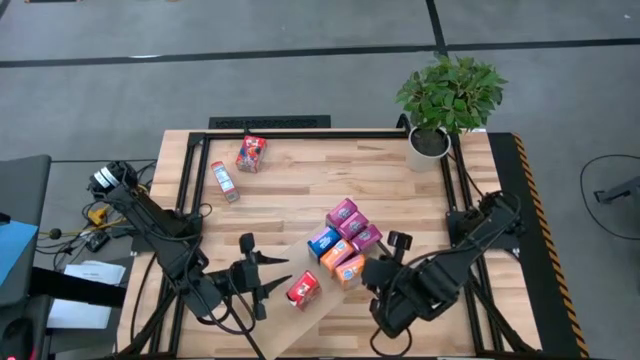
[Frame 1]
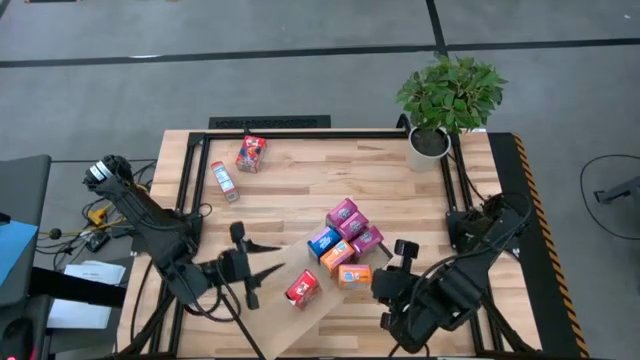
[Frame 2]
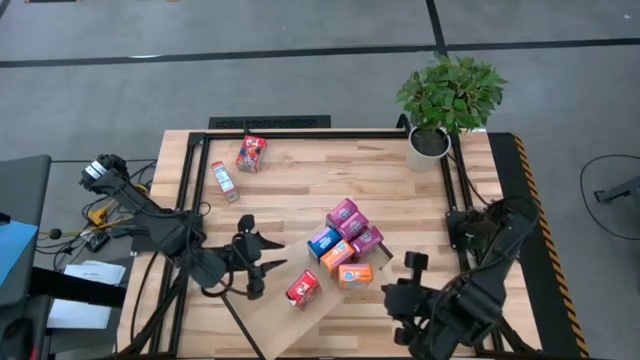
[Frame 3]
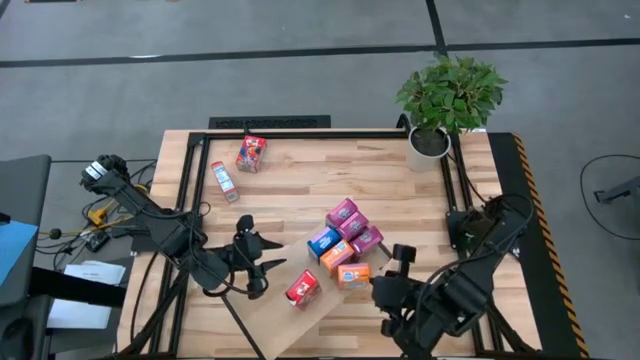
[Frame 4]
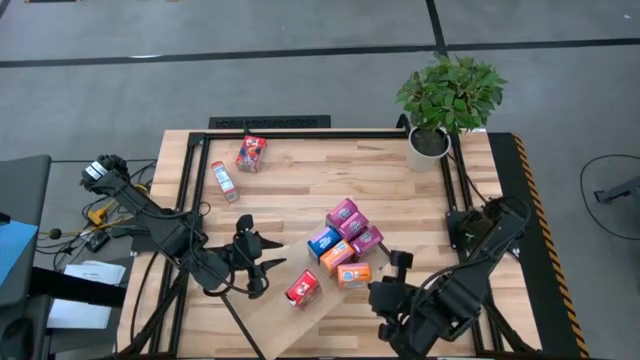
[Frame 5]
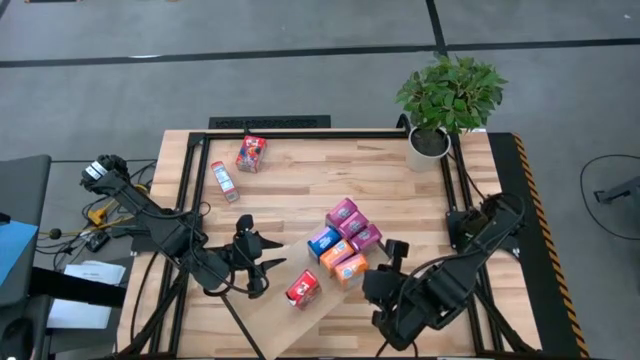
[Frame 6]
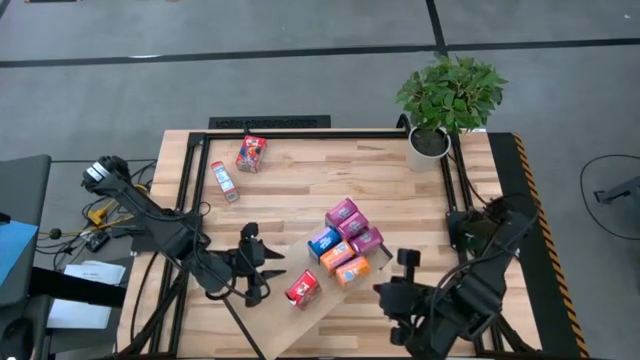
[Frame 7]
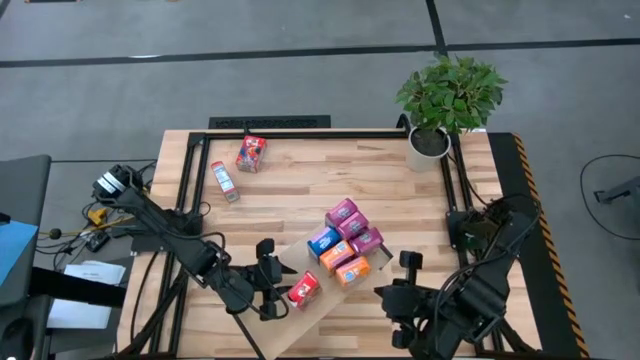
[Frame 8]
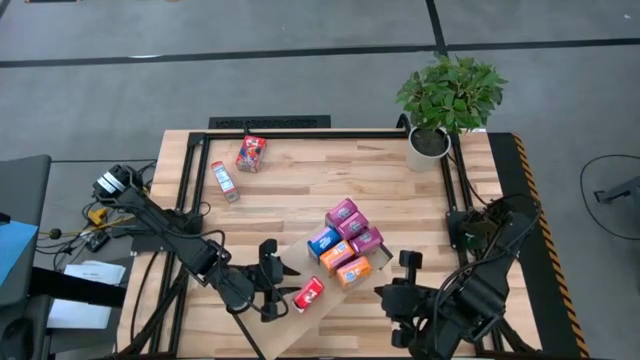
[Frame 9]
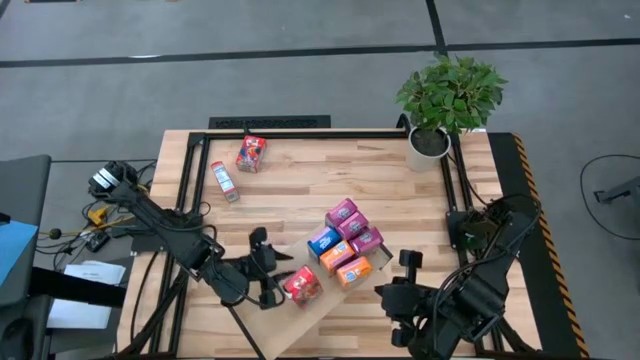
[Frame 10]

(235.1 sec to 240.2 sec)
Task: Stack cereal on shelf
Adjust the cereal box on the shelf

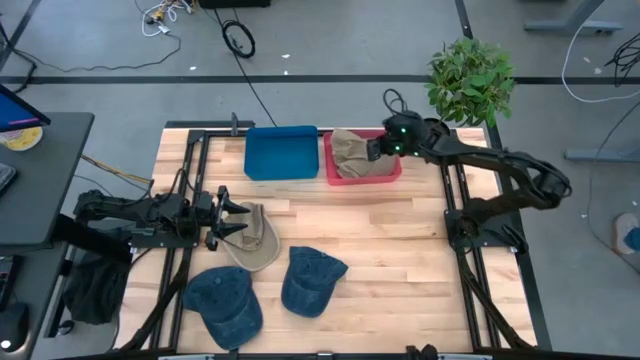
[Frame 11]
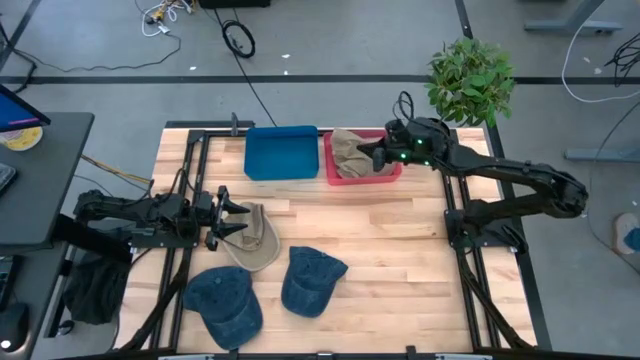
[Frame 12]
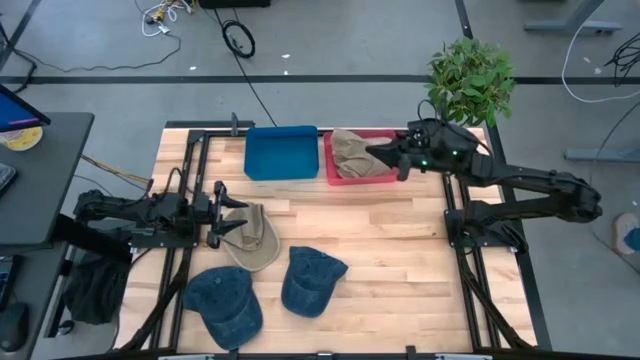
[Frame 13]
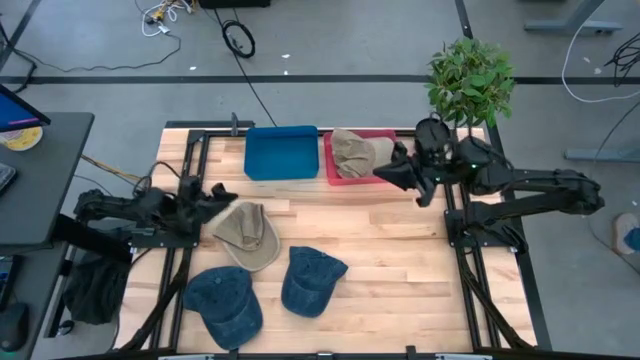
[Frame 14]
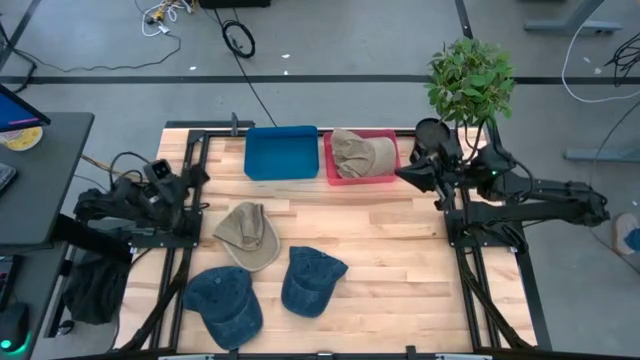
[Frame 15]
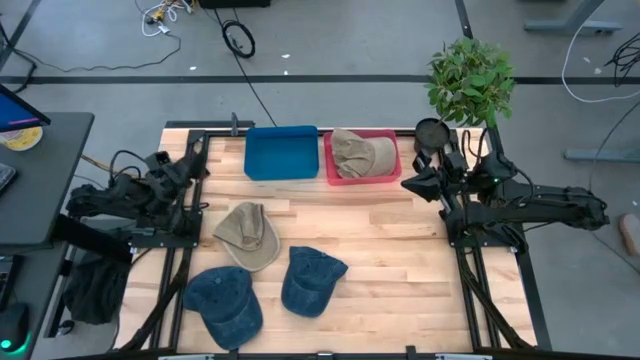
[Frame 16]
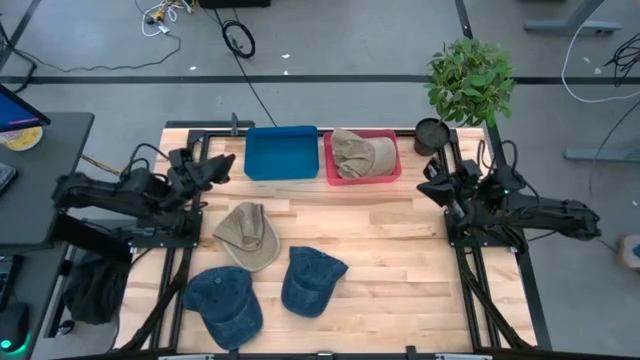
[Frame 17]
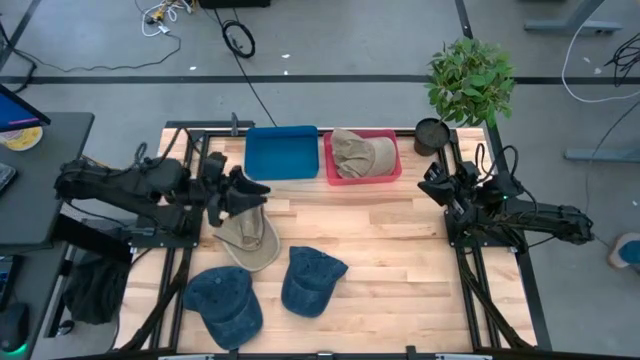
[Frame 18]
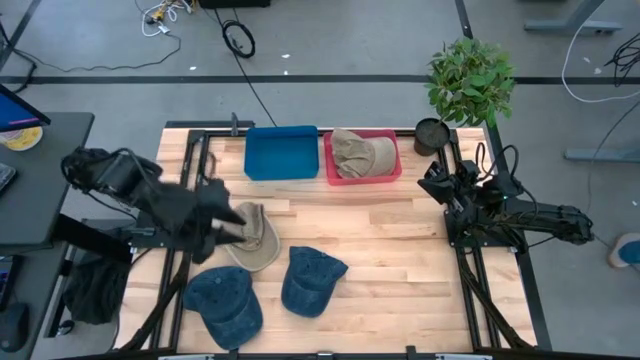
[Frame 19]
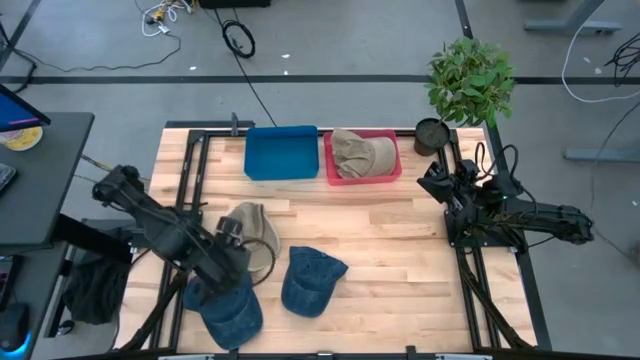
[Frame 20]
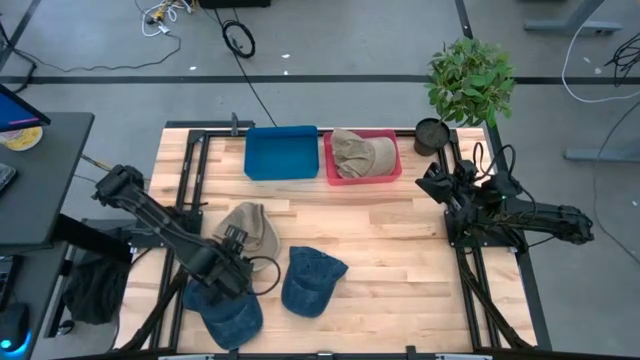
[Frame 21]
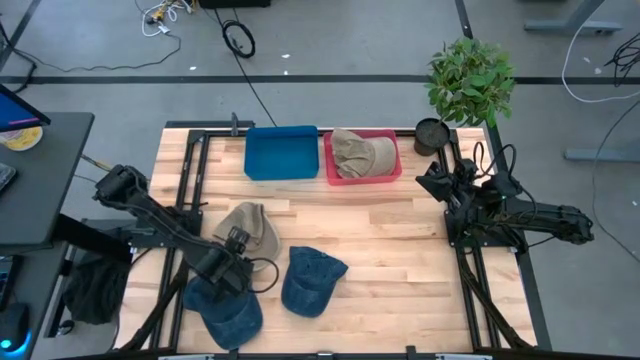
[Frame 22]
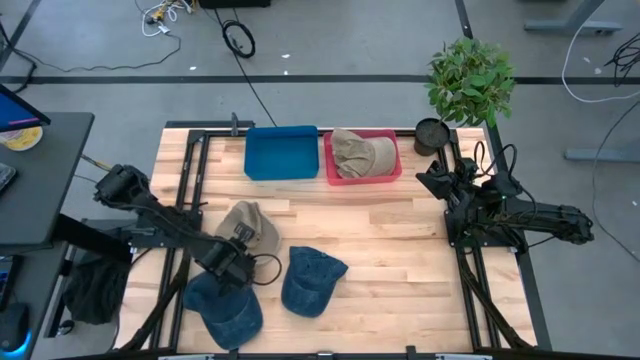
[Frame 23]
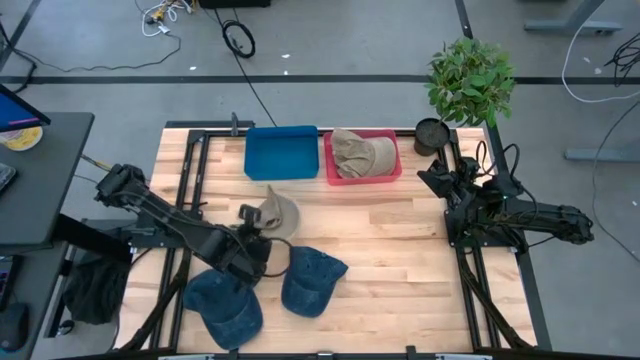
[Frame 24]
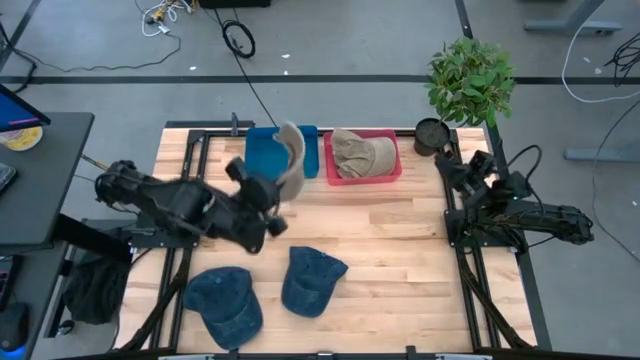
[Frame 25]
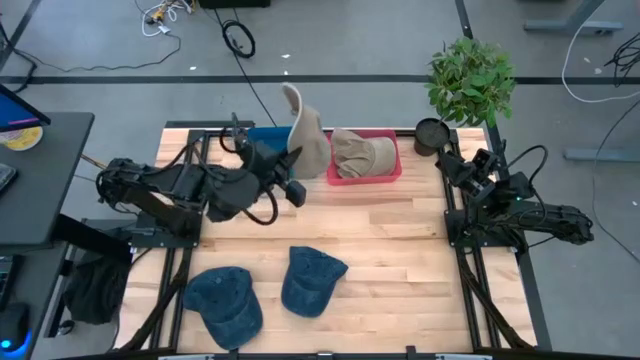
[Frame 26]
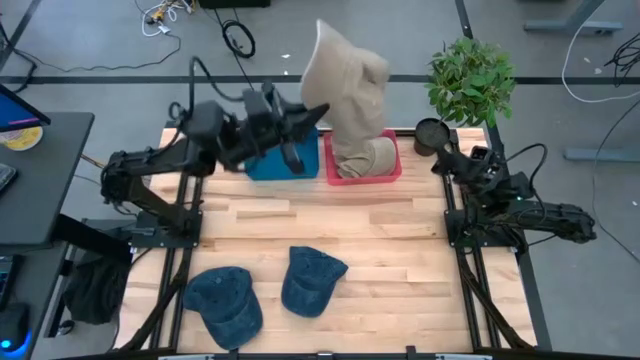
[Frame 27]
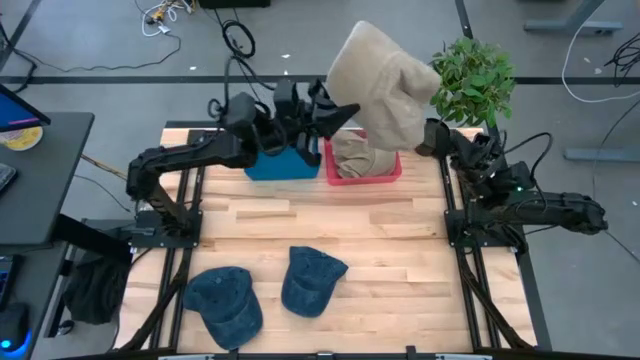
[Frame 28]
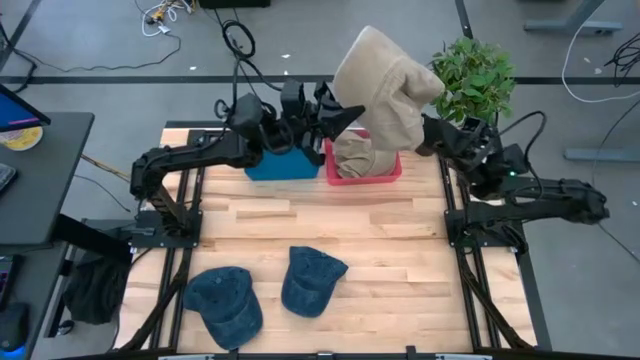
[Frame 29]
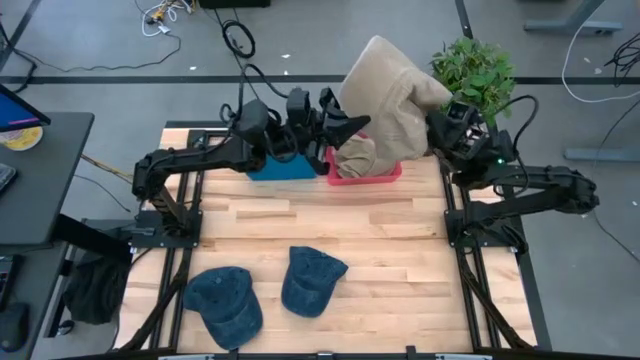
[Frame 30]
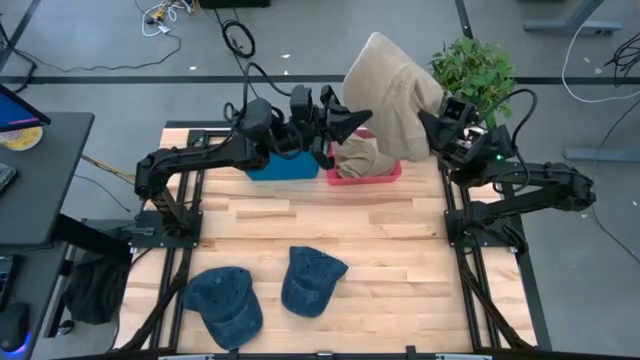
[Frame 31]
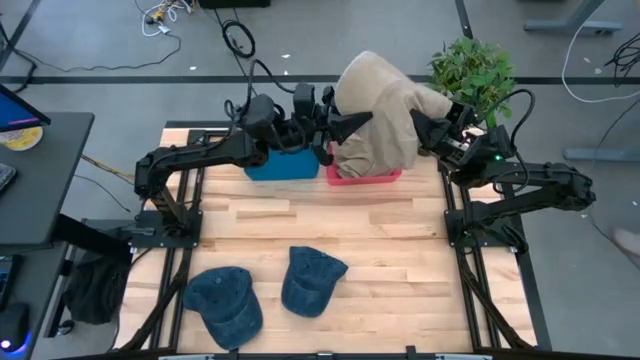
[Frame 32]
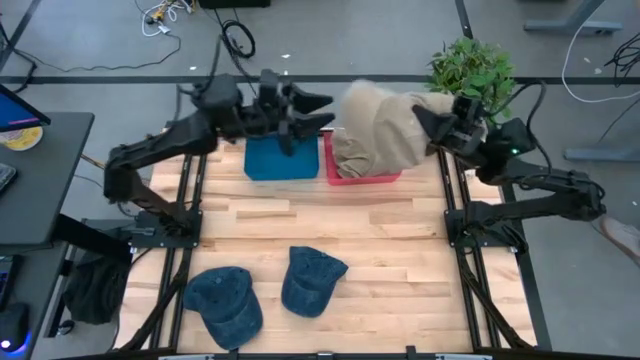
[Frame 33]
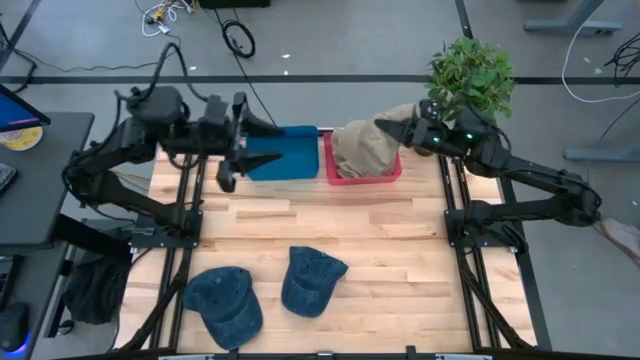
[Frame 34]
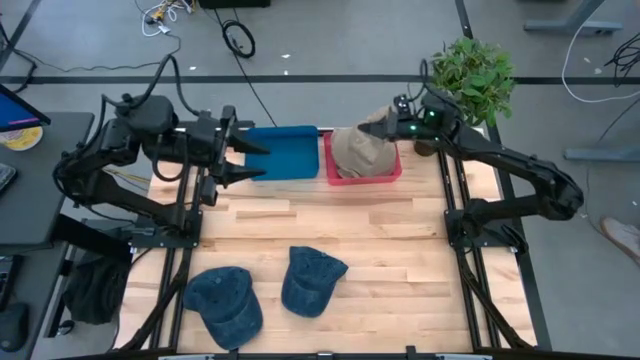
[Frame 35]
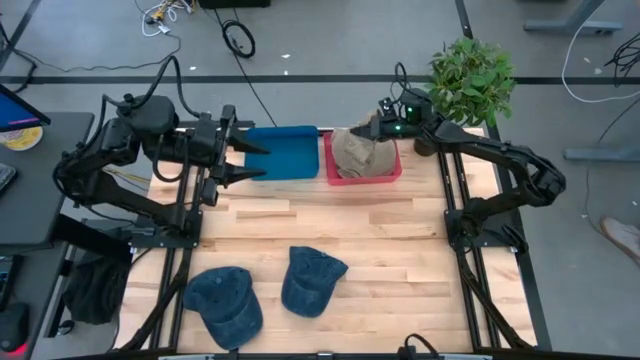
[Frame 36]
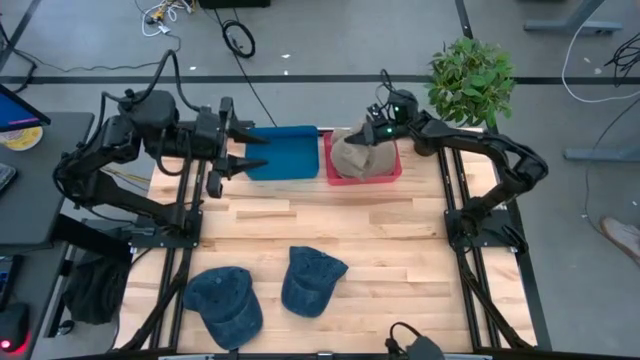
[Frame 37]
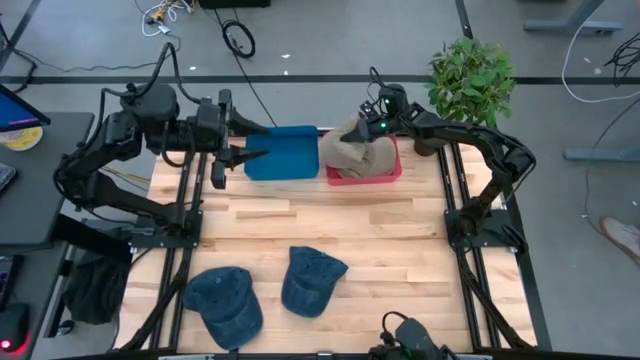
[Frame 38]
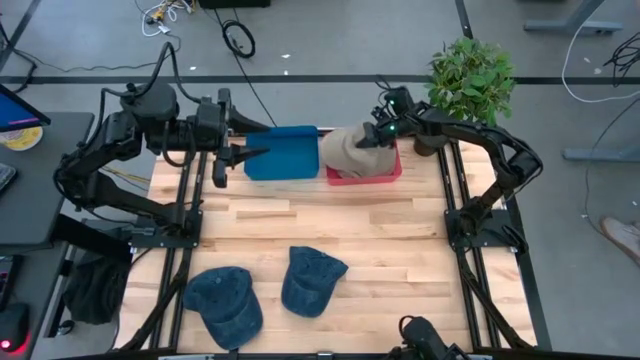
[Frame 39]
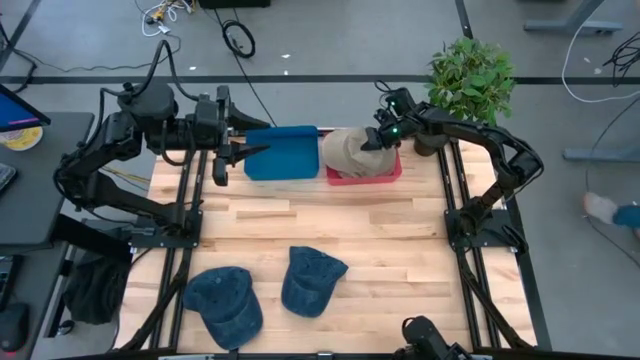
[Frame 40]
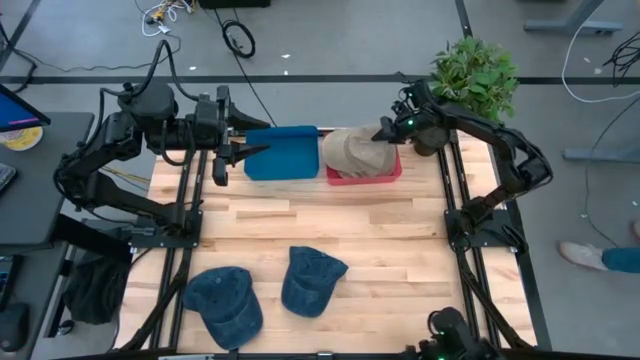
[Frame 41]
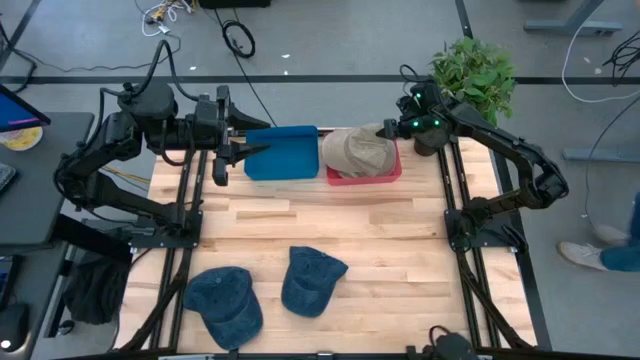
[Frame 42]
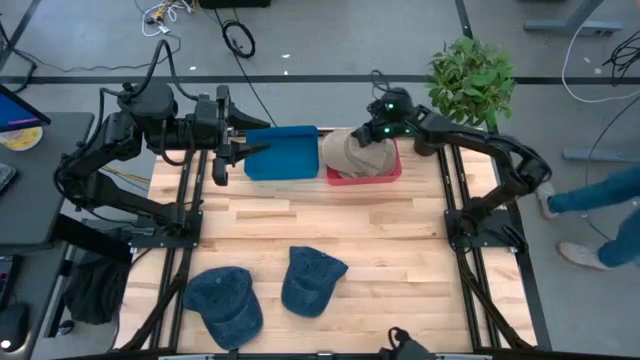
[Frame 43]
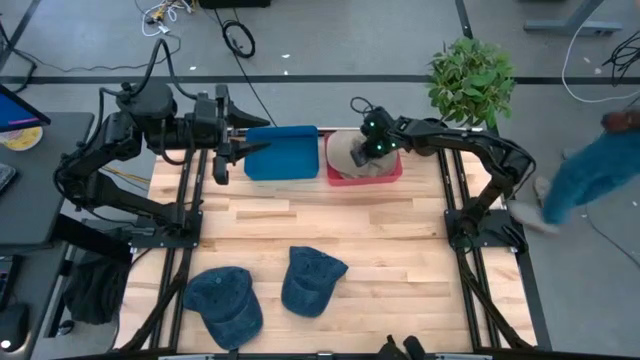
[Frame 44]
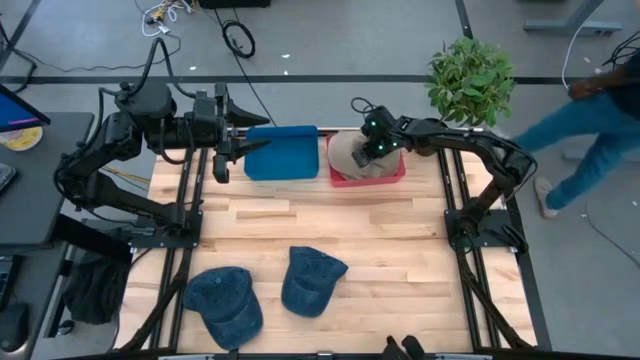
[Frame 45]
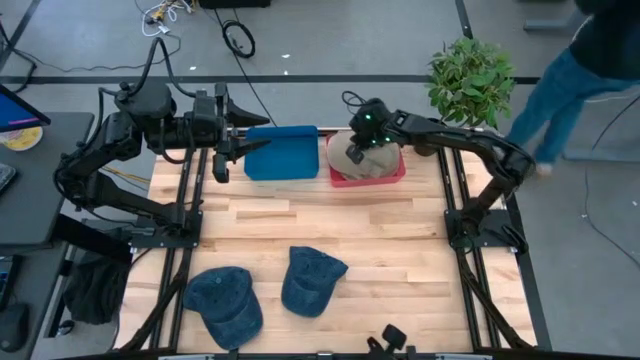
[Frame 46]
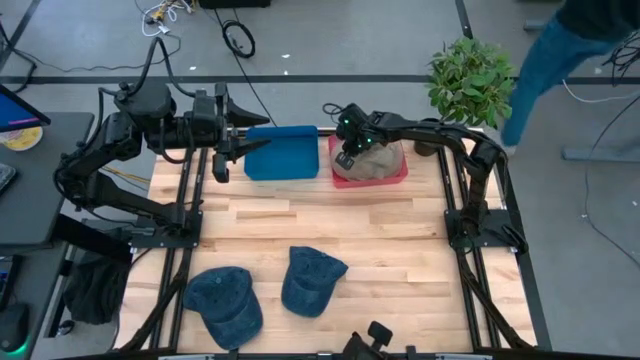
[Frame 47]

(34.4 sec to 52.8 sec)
Task: Pick & Place hat
Put the brown cap into the red bin
